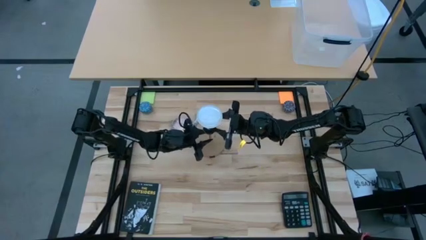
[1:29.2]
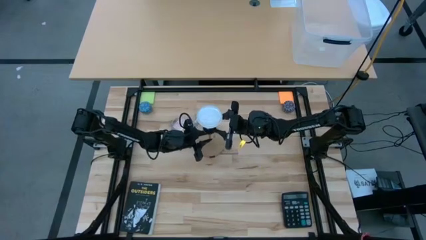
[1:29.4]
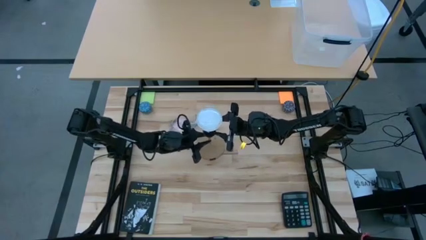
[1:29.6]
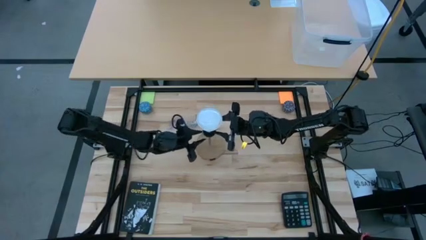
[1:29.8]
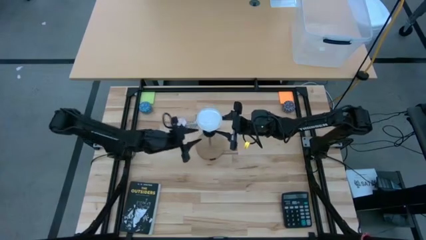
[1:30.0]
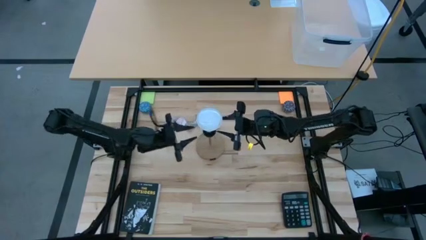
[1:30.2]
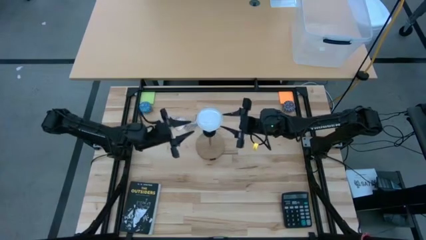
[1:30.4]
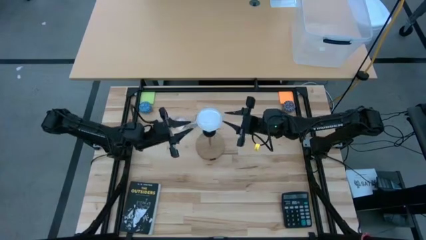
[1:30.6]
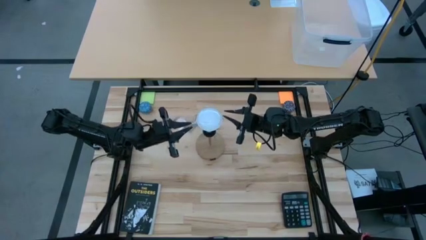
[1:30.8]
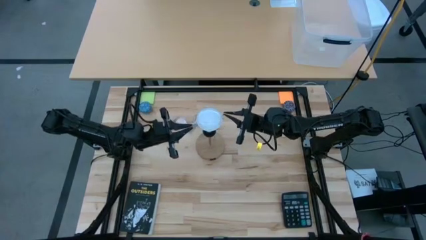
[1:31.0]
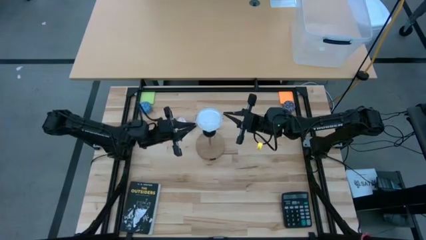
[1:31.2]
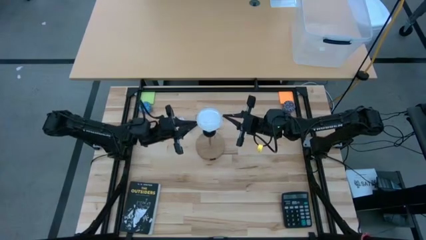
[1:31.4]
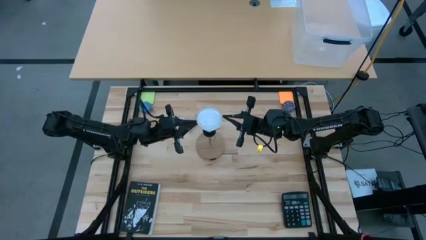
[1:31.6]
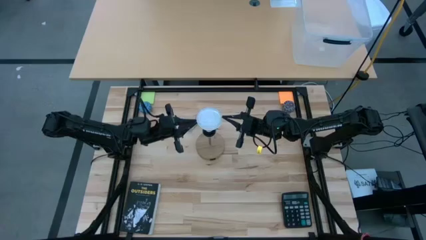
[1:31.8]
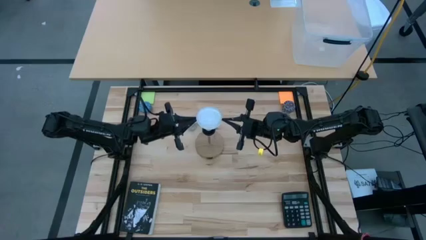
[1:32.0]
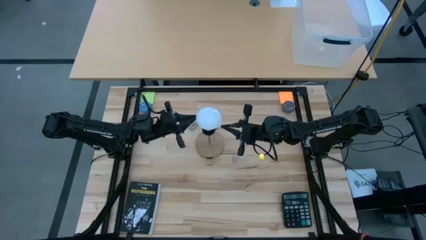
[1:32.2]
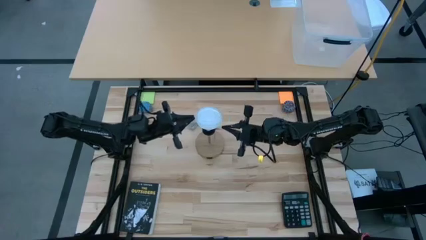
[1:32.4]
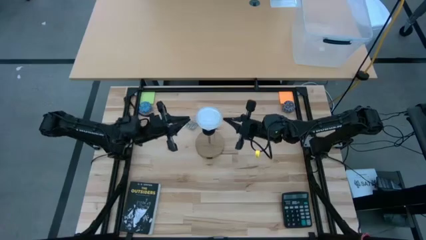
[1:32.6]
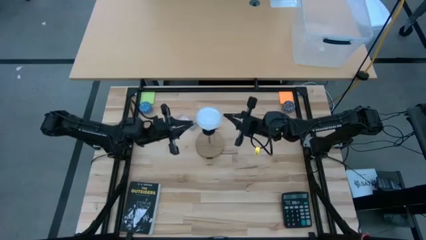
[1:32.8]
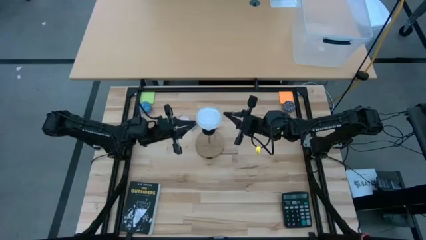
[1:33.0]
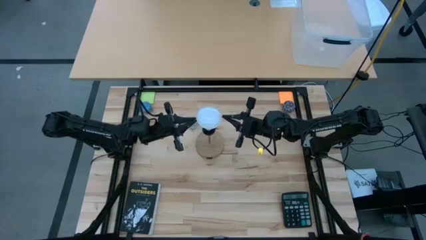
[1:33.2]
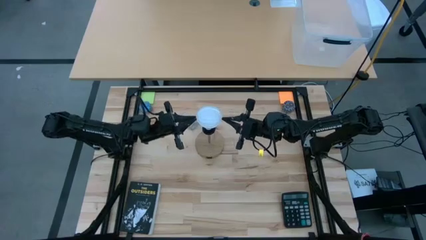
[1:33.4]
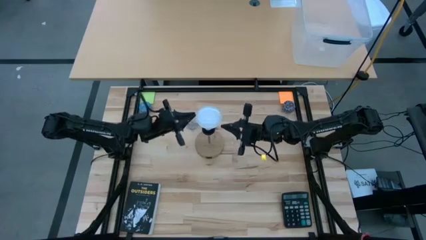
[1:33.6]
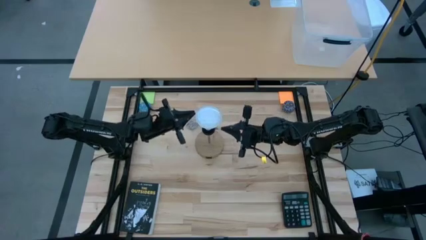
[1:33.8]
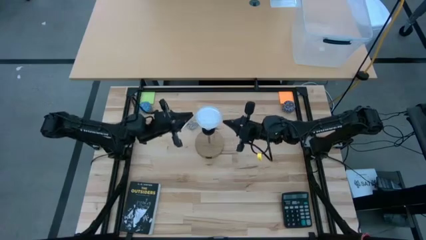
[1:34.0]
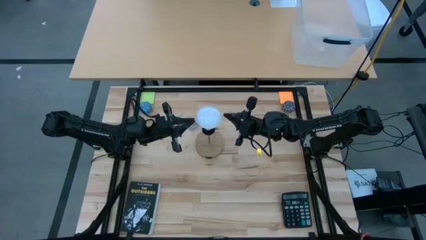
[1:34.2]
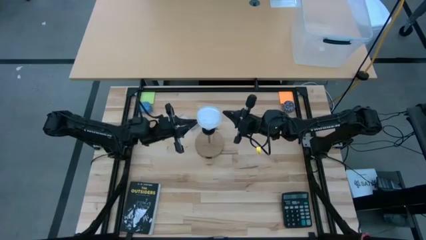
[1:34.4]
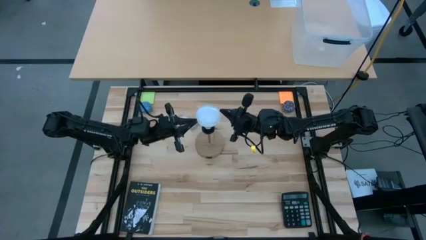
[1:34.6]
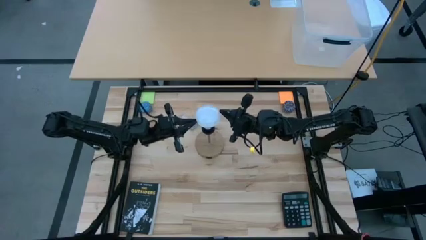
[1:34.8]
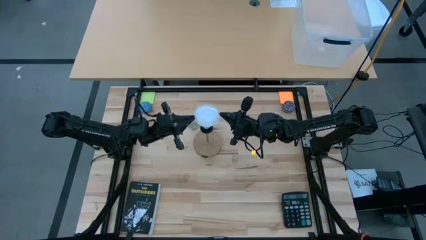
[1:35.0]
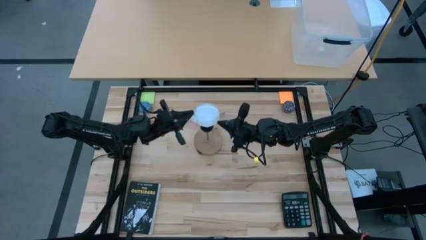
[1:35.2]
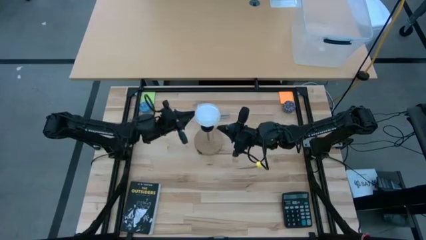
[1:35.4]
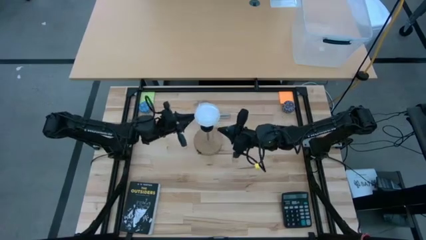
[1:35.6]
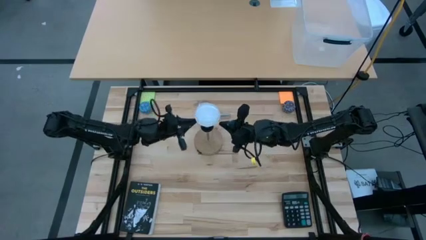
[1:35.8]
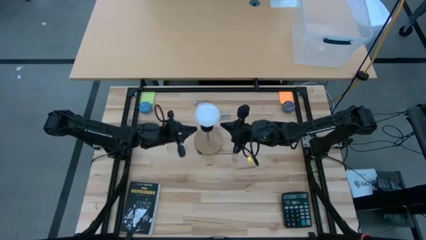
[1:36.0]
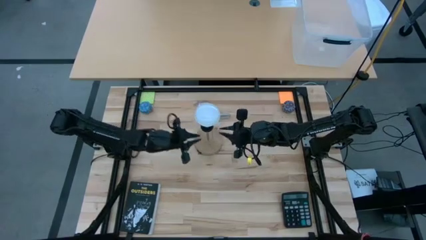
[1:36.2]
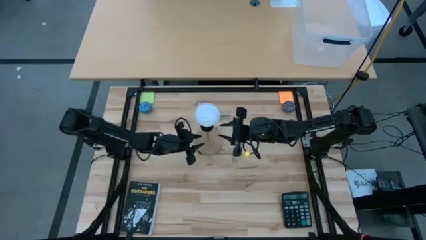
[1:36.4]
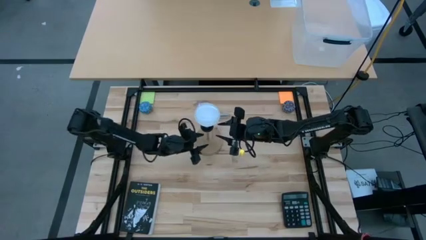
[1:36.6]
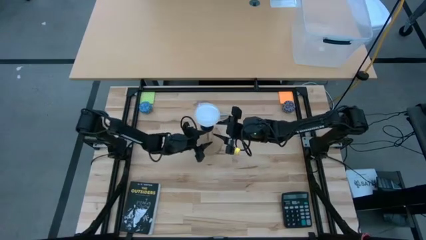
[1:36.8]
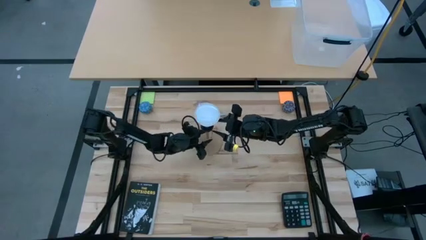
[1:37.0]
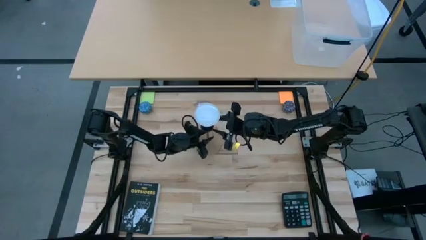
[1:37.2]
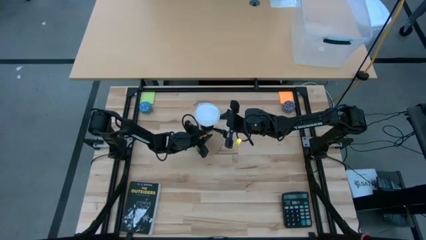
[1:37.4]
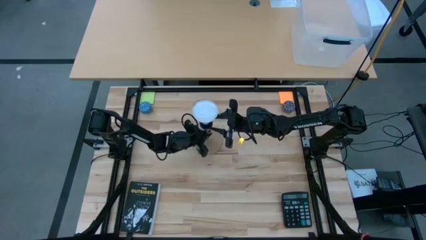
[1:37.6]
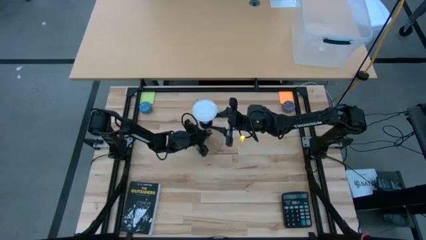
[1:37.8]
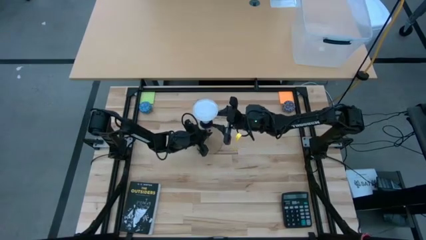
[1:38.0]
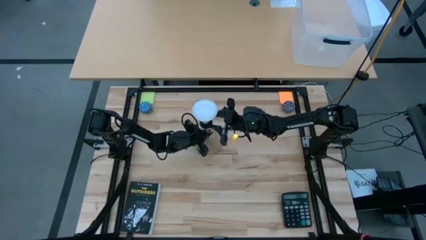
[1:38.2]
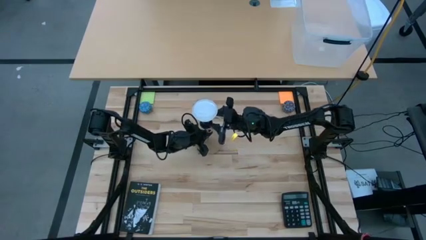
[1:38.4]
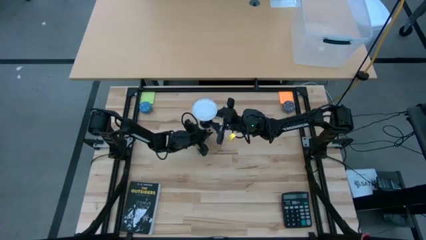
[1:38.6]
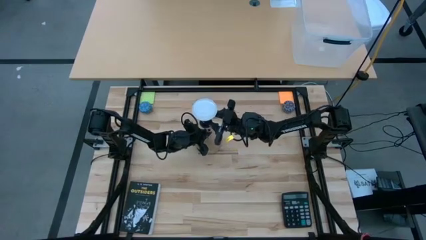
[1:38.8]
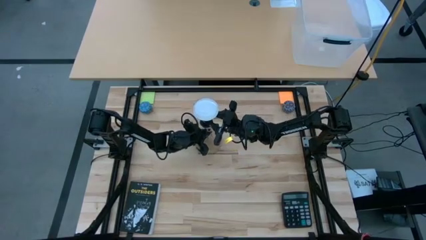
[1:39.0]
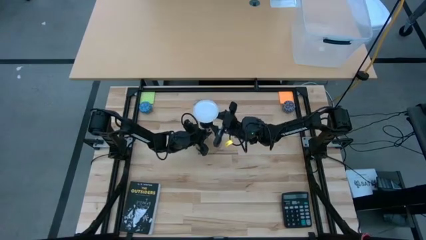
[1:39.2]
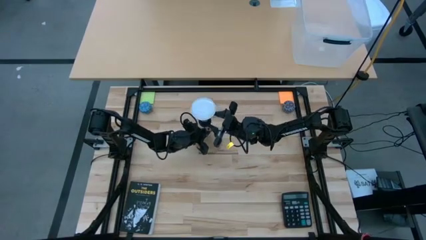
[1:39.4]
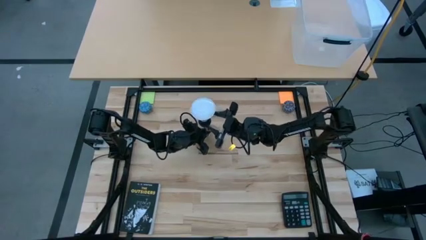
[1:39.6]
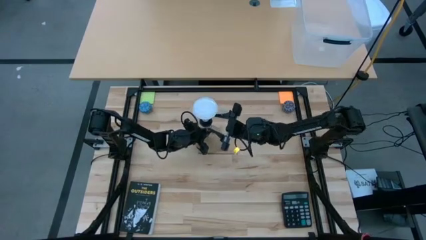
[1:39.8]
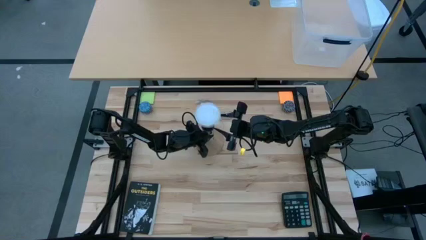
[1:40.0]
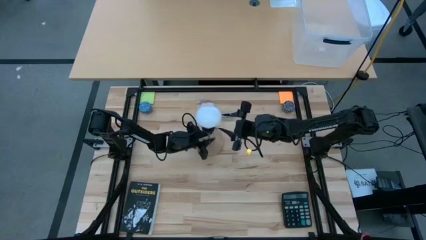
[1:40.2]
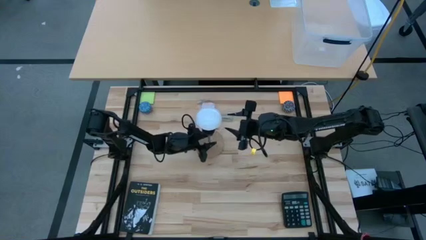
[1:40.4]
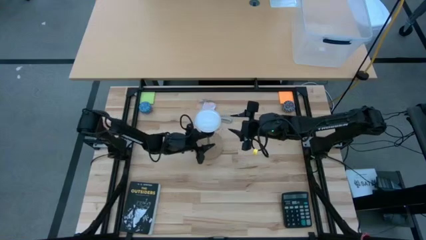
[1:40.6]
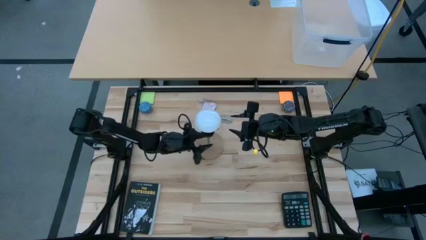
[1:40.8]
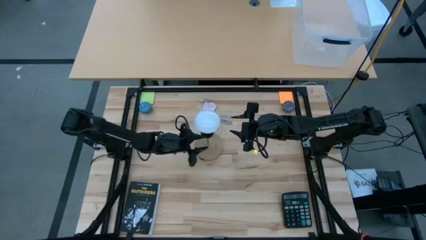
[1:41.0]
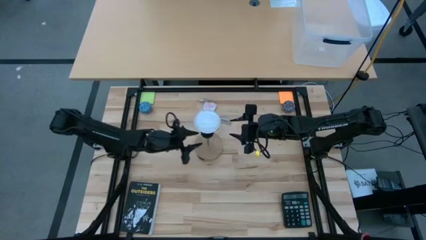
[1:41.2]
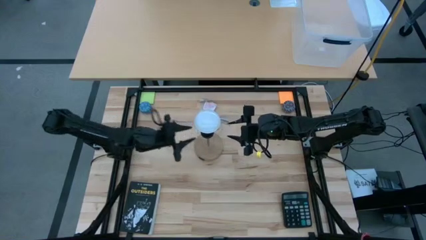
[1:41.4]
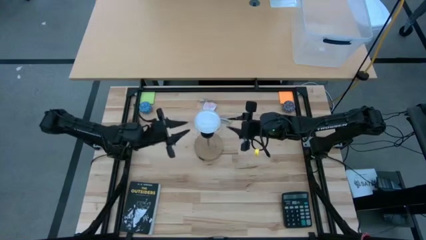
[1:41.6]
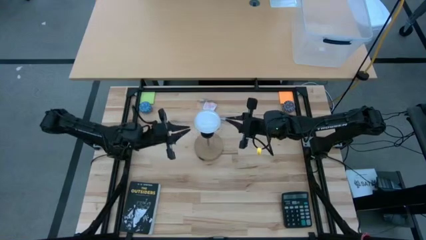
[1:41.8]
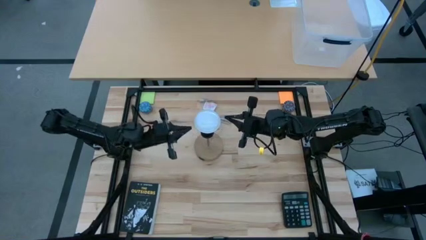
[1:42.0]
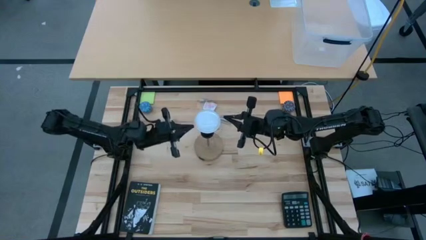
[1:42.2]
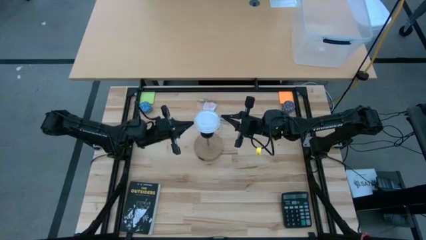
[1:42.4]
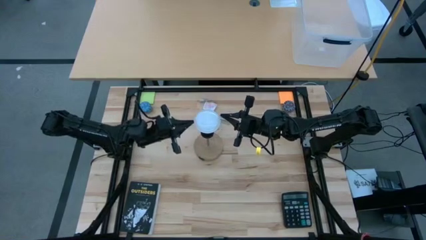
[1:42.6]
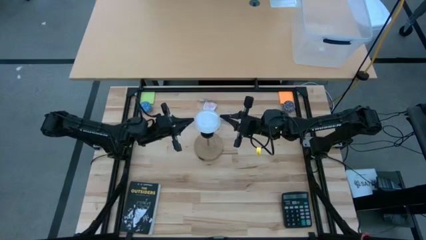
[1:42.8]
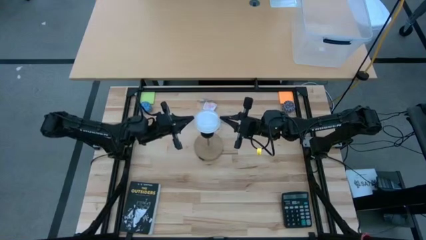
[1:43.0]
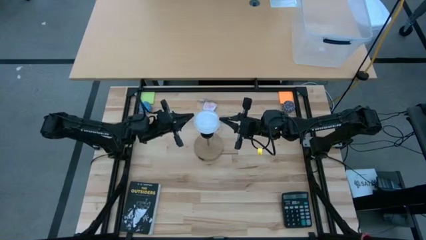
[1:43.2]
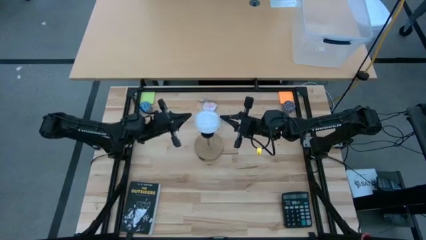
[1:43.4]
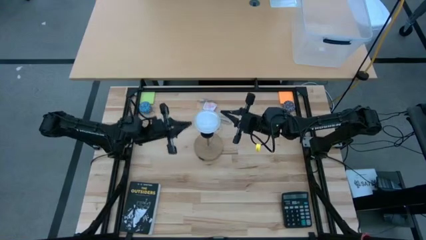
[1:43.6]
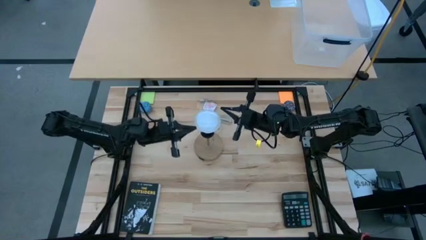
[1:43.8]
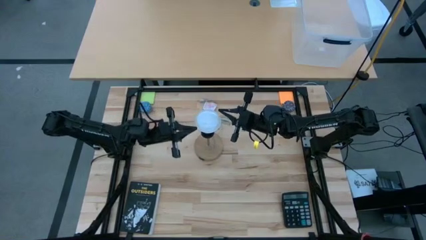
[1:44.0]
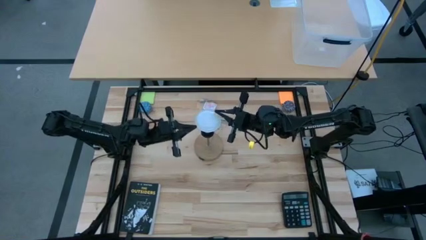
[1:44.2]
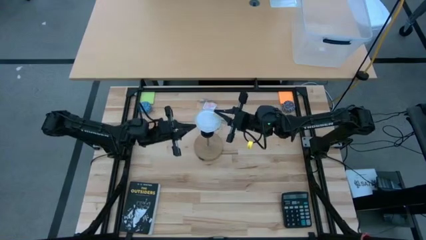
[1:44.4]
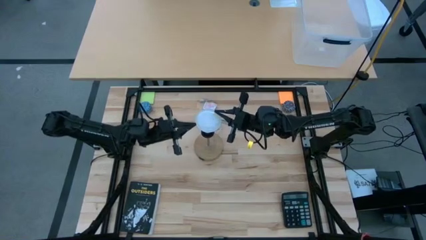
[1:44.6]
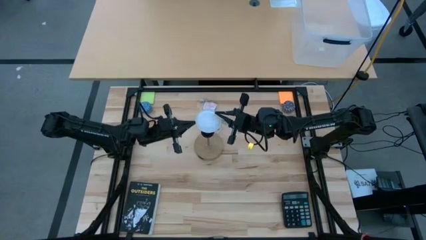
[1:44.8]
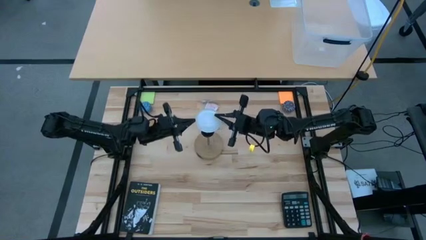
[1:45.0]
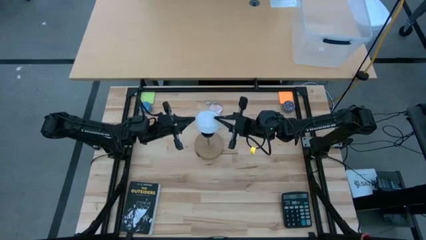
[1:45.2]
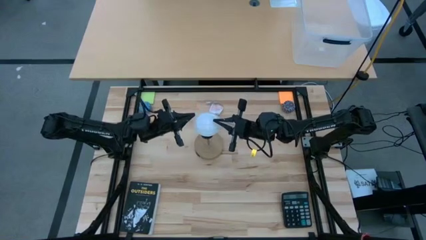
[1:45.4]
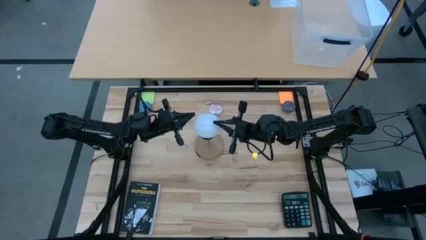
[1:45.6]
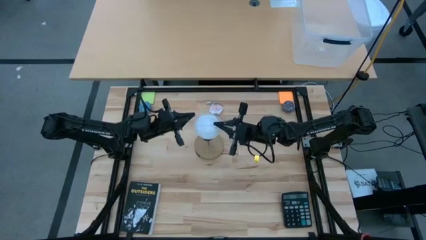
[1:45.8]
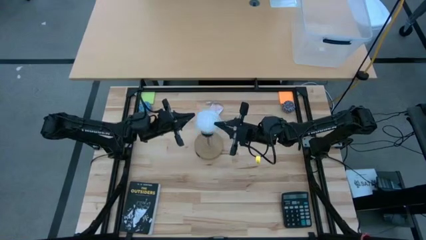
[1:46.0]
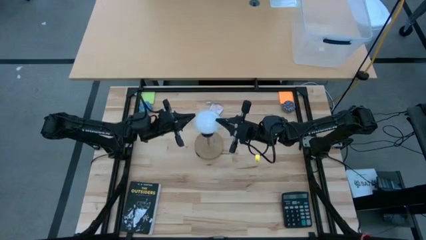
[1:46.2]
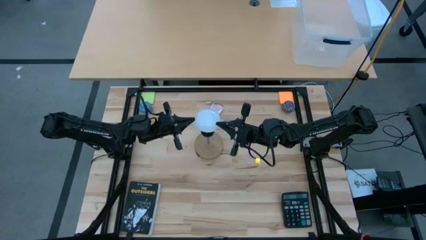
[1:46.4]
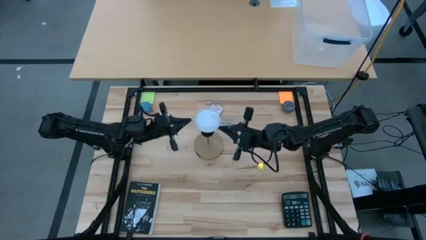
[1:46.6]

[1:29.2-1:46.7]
Task: Screw lightbulb
Insert the lightbulb on the lamp
